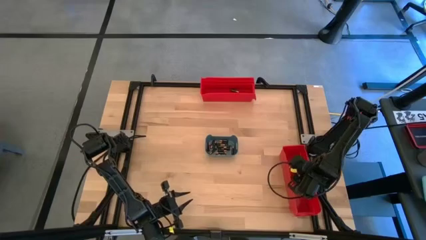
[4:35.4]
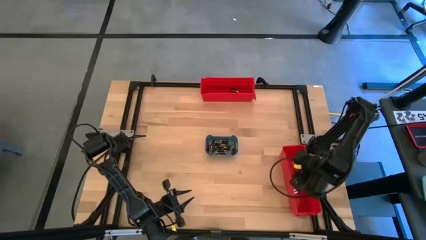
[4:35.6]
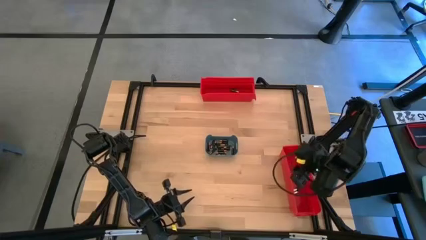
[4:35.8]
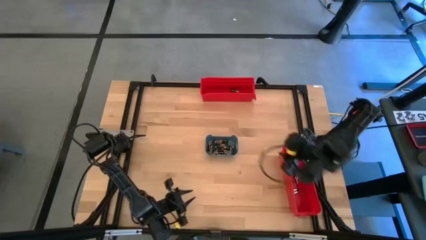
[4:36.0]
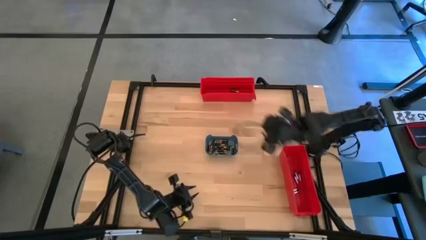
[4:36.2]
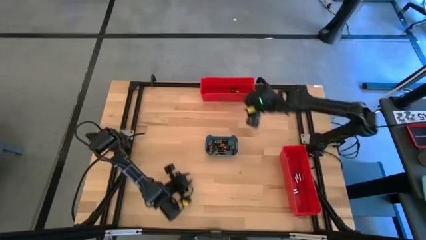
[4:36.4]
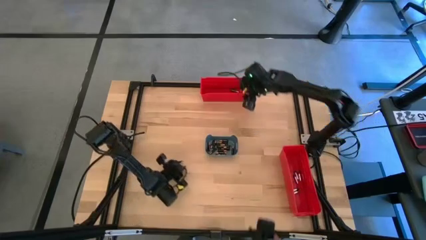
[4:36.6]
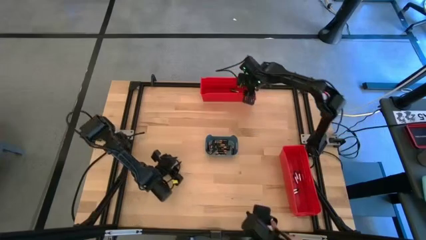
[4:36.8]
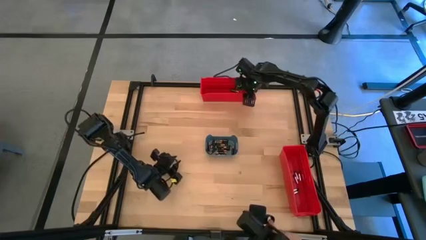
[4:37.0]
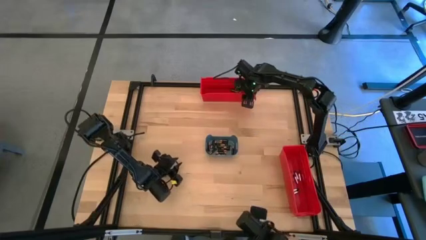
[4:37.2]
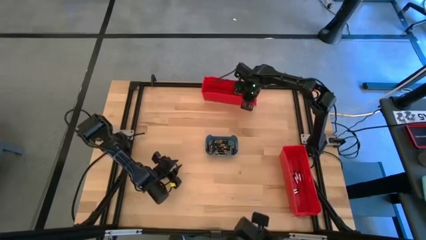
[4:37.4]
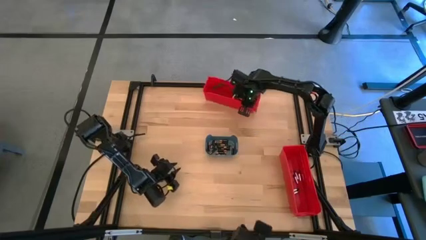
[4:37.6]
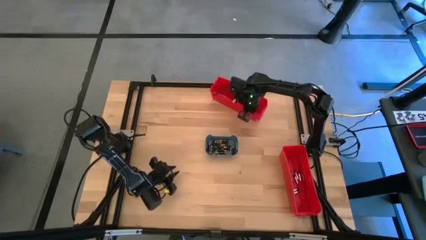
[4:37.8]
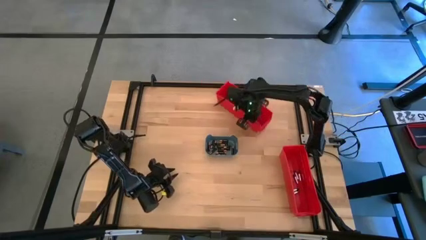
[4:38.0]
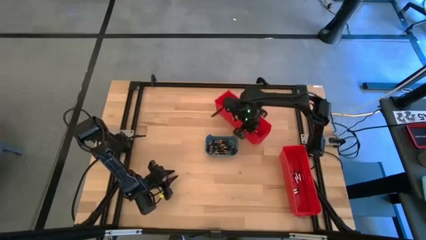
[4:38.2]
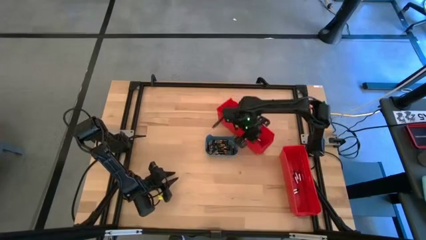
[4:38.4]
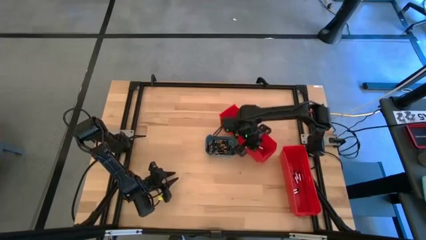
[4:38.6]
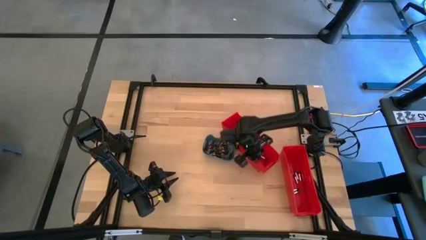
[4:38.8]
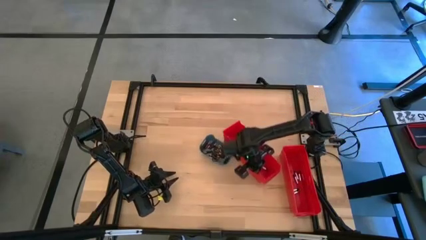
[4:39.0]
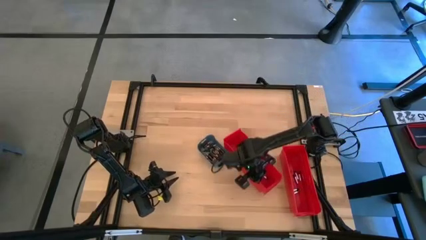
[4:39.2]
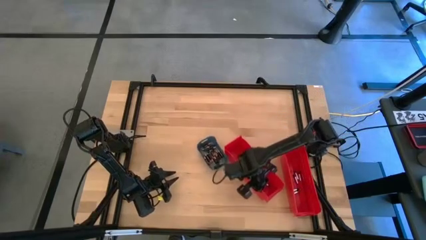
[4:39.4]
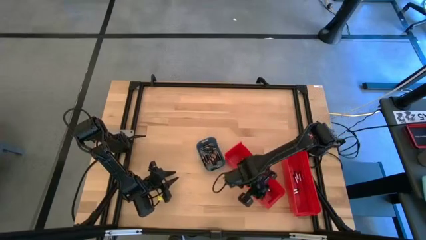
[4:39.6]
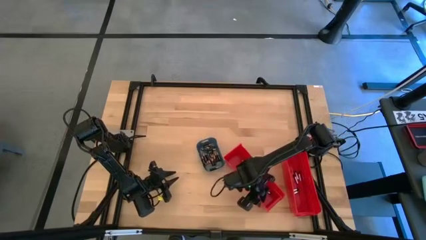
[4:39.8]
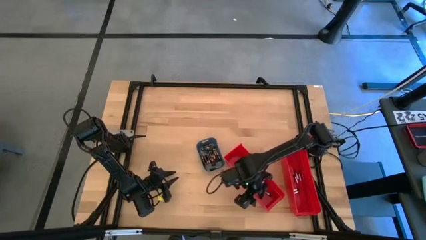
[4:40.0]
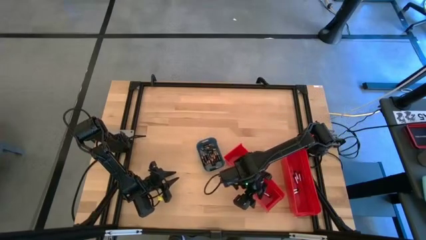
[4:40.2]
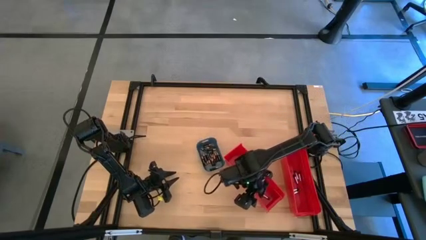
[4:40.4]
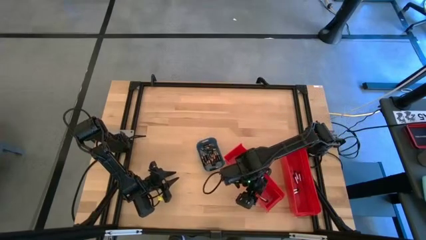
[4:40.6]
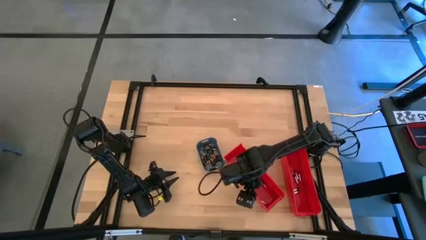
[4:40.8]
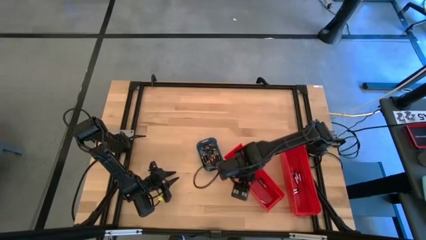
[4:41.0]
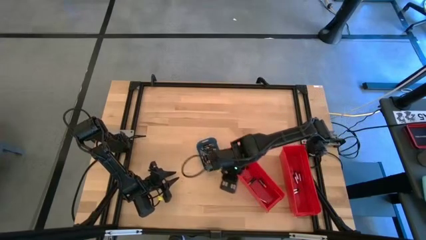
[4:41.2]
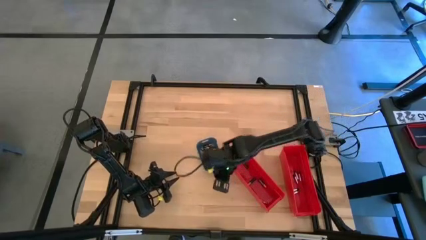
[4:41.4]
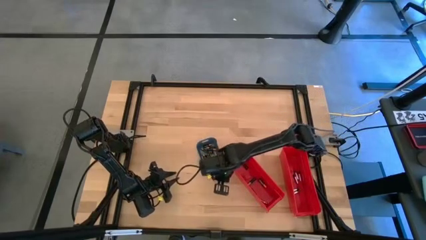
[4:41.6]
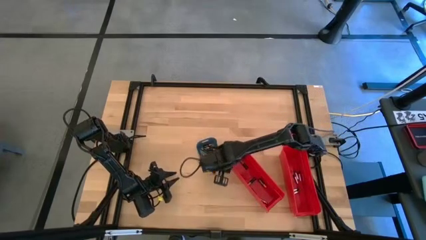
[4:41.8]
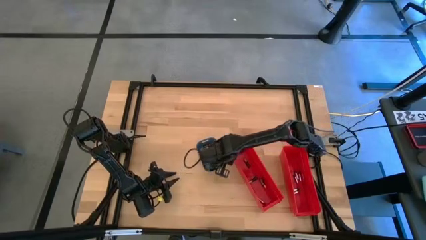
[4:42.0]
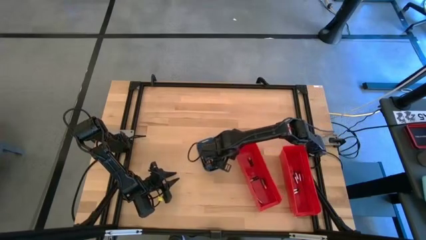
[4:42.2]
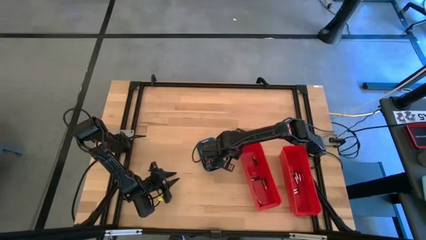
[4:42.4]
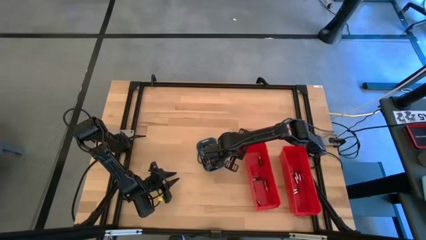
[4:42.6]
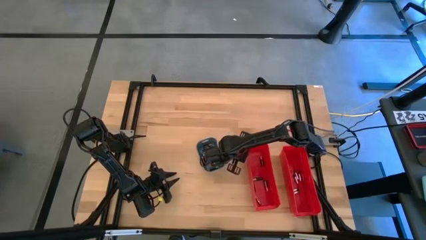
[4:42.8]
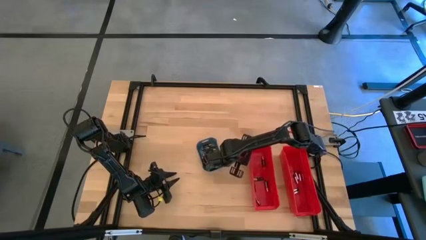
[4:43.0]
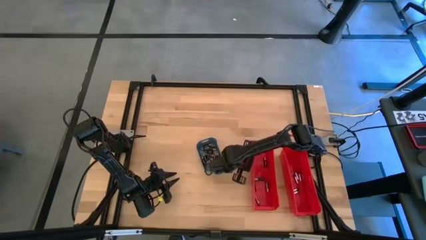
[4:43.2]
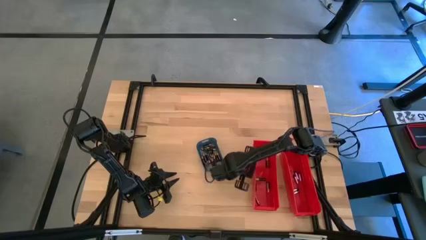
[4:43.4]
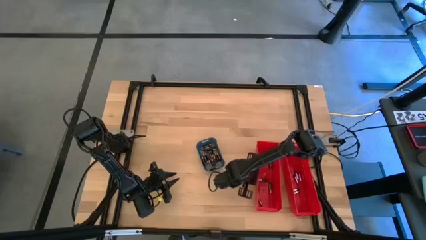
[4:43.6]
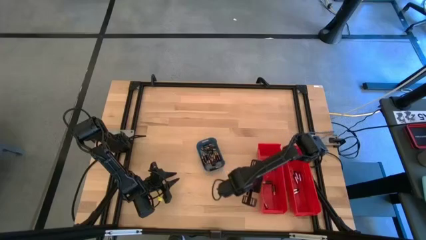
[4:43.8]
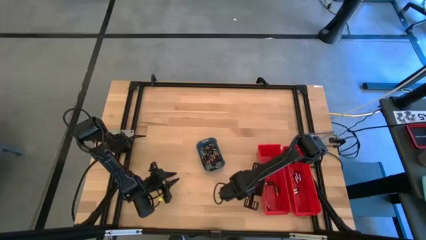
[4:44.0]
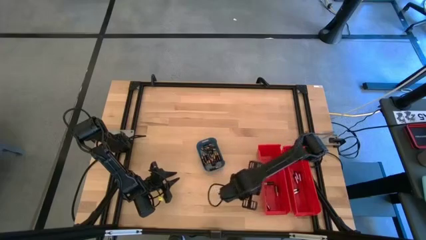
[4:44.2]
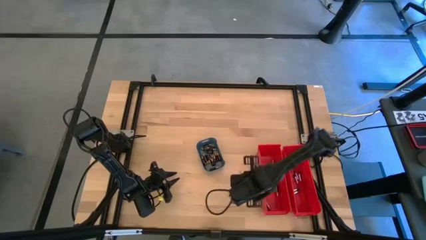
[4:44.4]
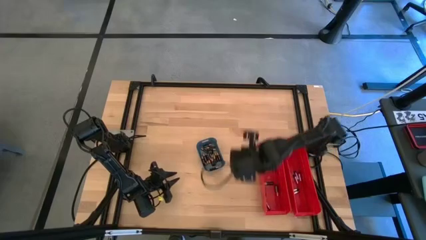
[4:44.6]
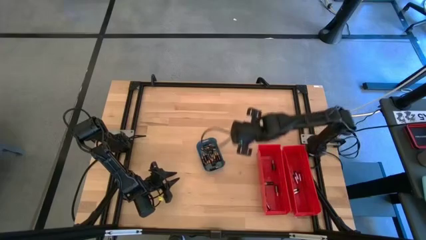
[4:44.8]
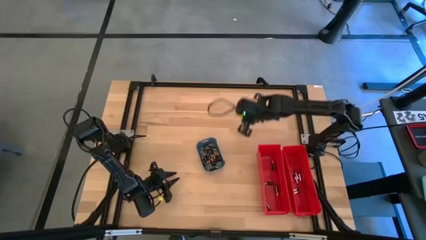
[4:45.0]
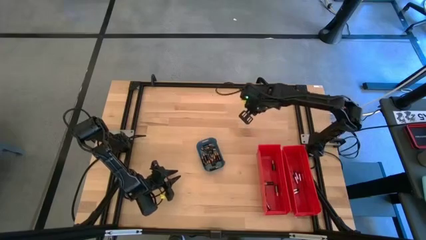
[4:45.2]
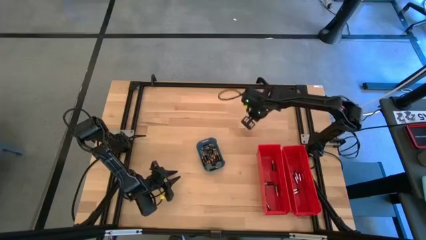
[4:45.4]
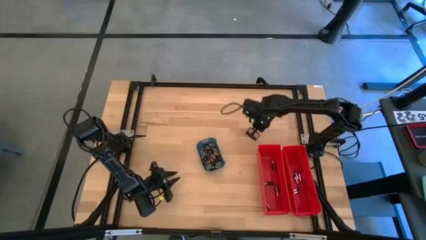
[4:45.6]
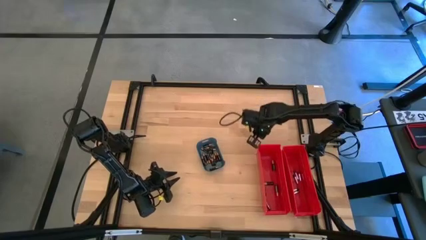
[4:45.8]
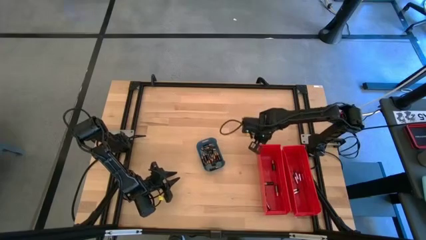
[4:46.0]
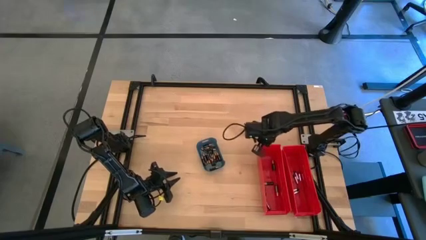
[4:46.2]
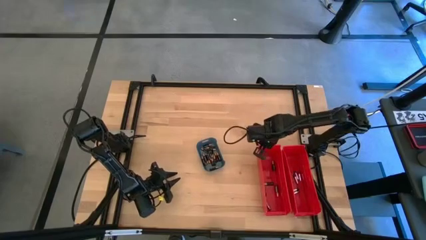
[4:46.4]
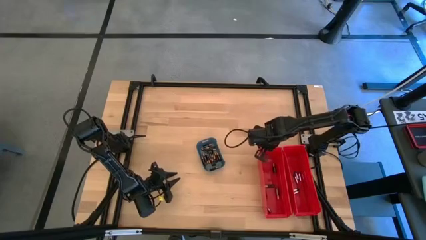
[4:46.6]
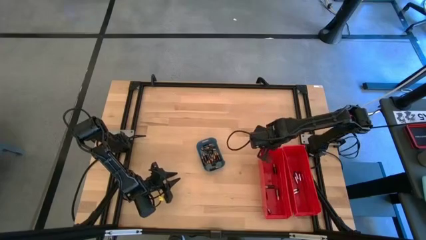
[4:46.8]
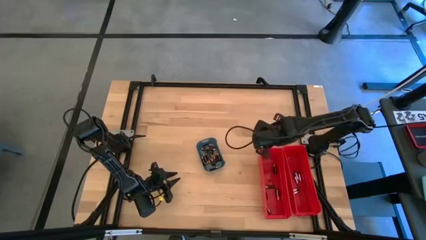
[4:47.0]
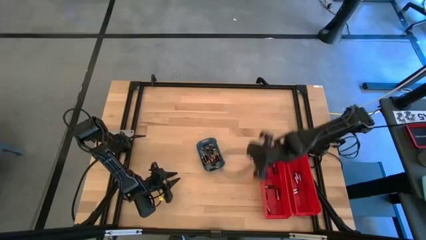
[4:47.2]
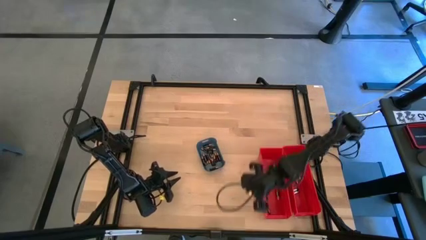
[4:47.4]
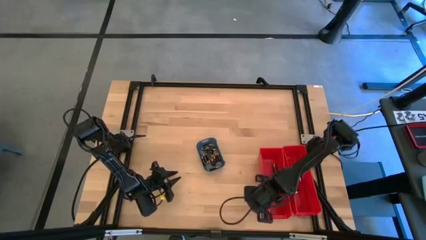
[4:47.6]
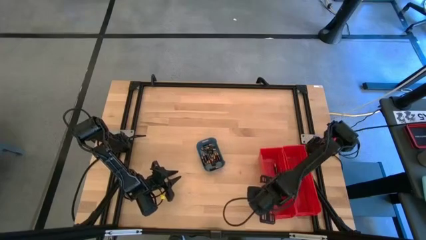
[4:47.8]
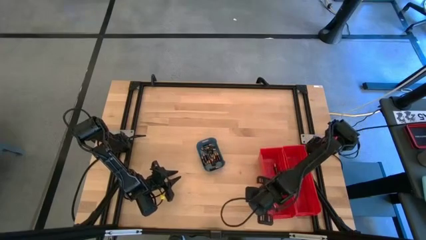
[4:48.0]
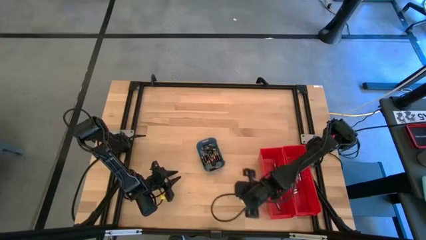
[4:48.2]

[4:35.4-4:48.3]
Task: Sort batteries
Move the top red bin from the top of the table to the bottom right

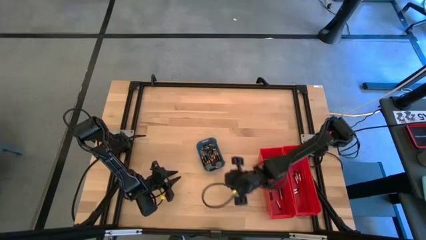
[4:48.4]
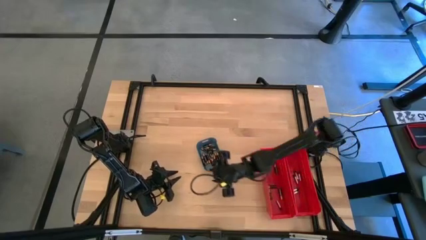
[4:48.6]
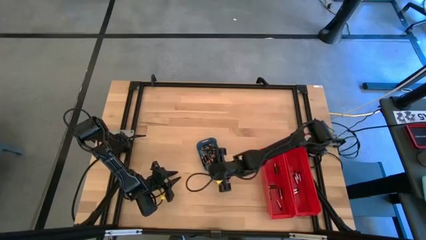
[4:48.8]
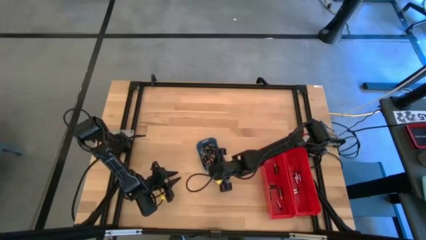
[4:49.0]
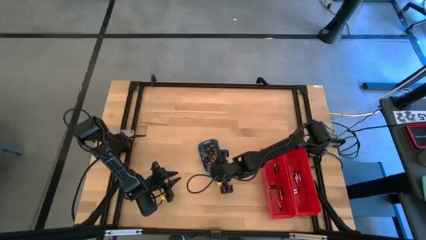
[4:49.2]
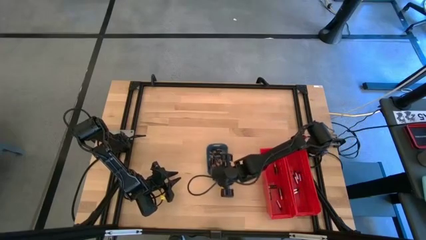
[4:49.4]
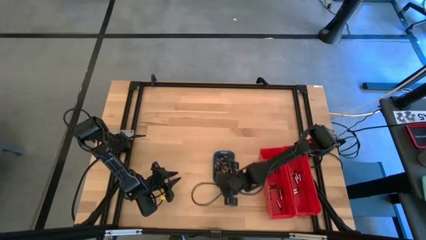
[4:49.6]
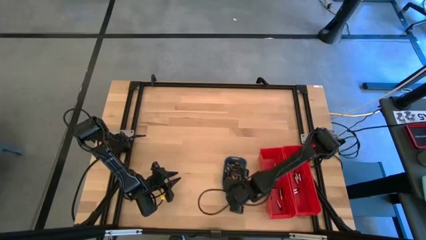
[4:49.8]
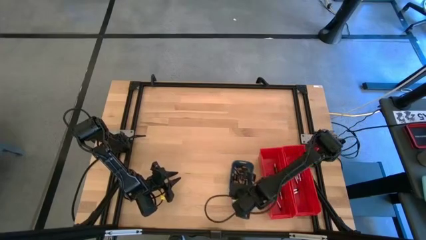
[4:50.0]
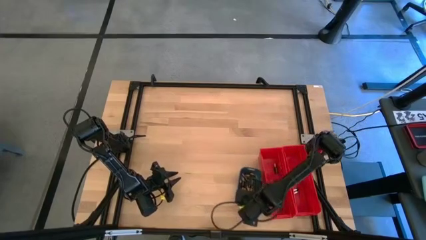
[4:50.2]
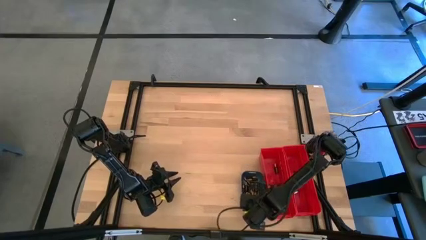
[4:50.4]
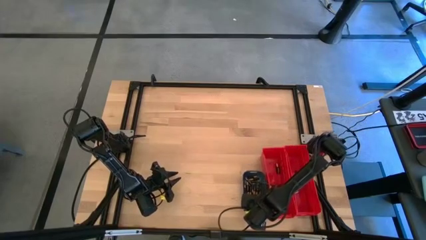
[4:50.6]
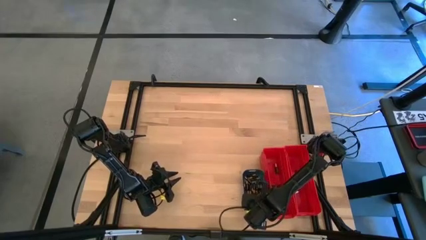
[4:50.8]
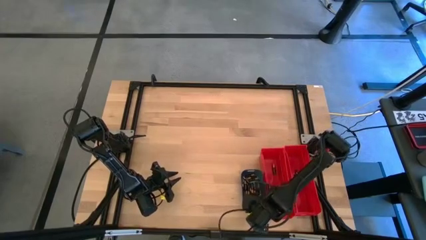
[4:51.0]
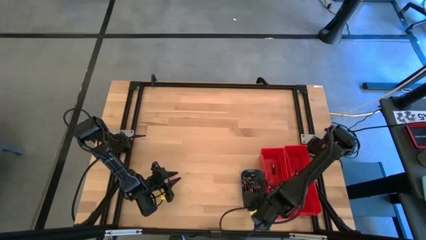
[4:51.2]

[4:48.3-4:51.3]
Move the dark green bin from the center of the table to the bottom right
